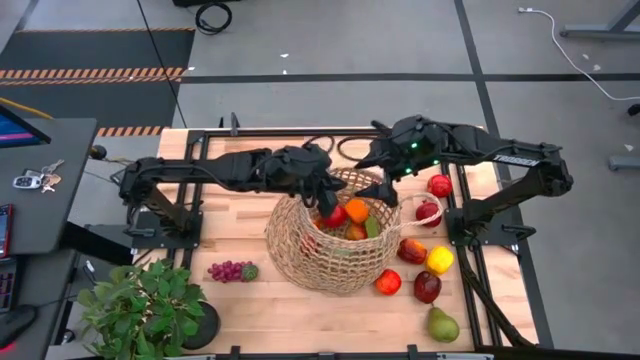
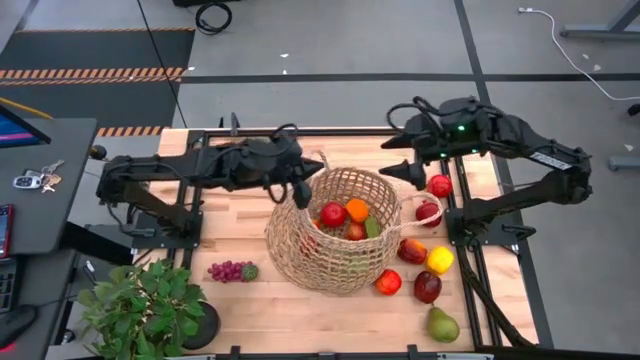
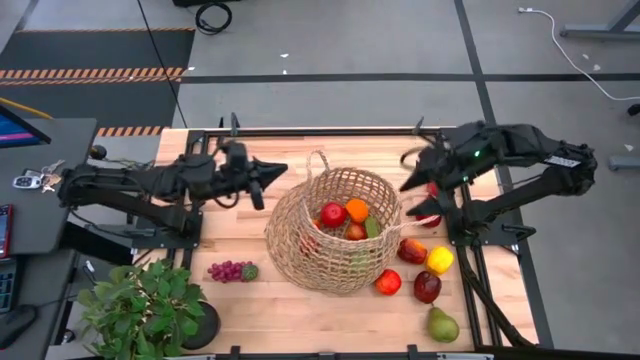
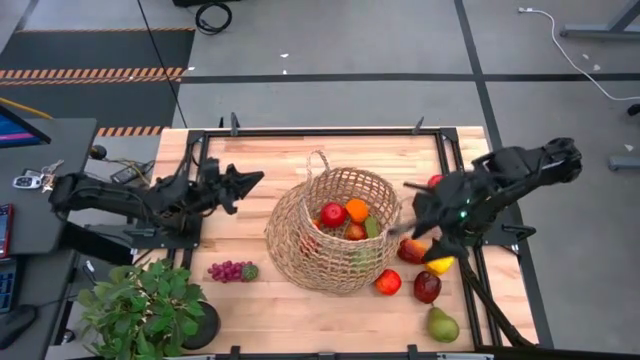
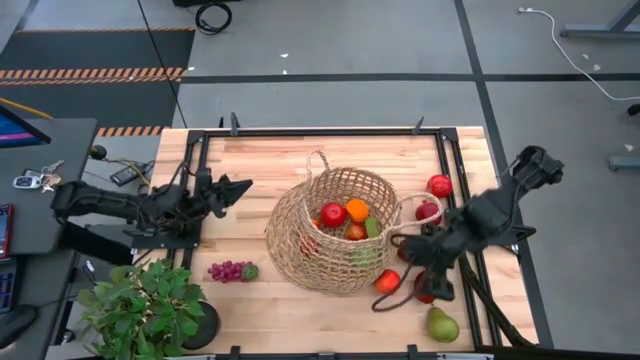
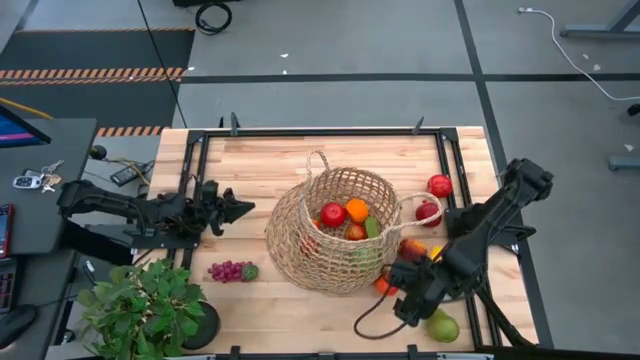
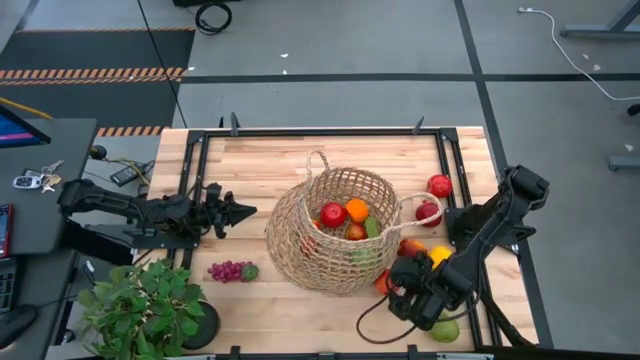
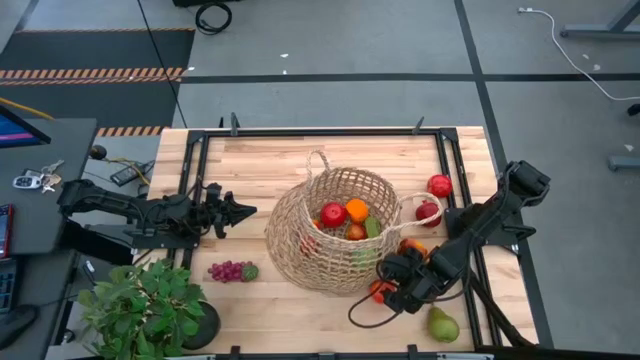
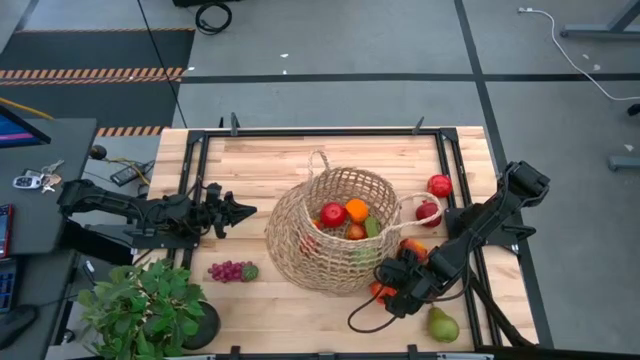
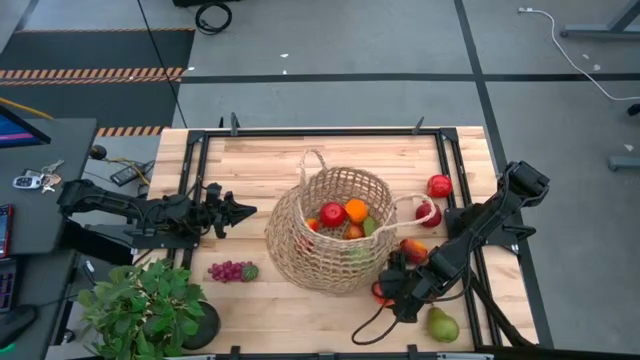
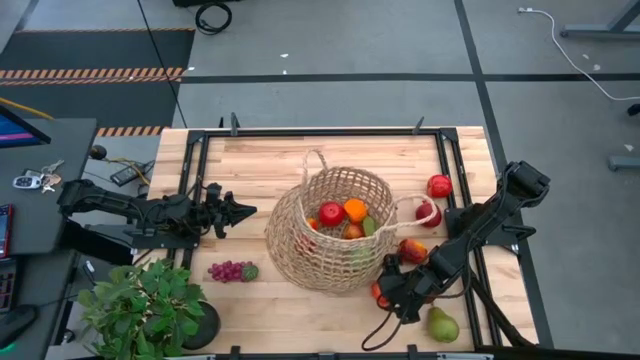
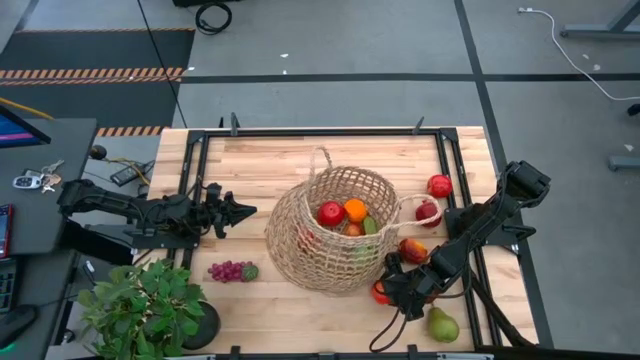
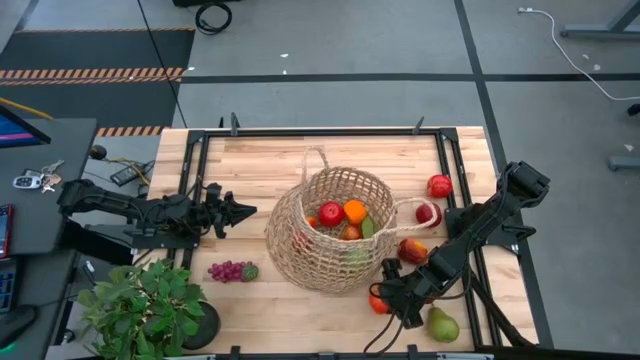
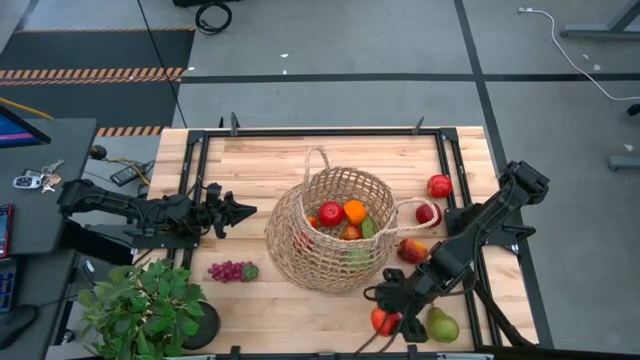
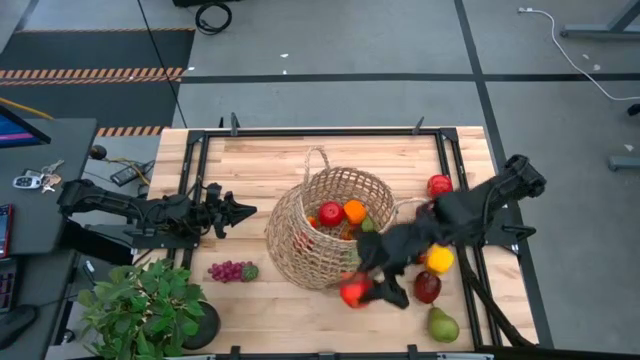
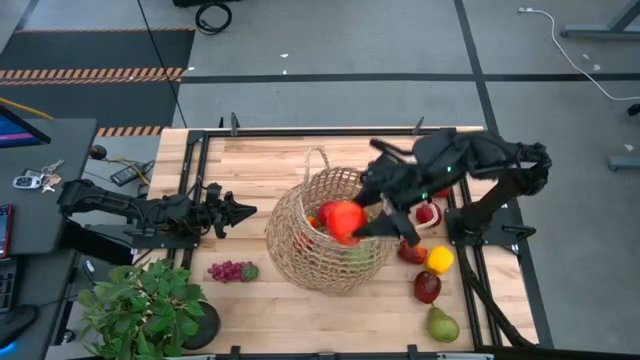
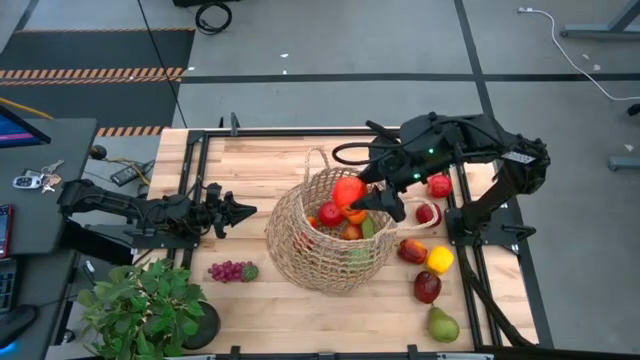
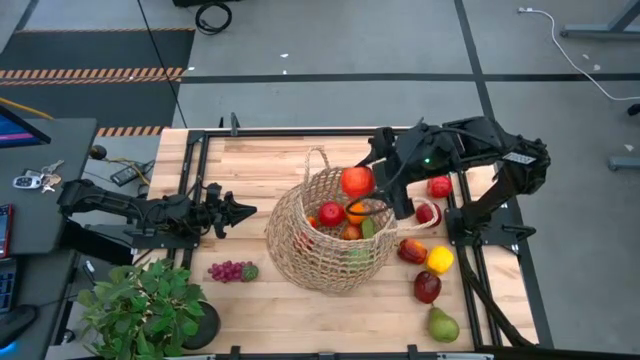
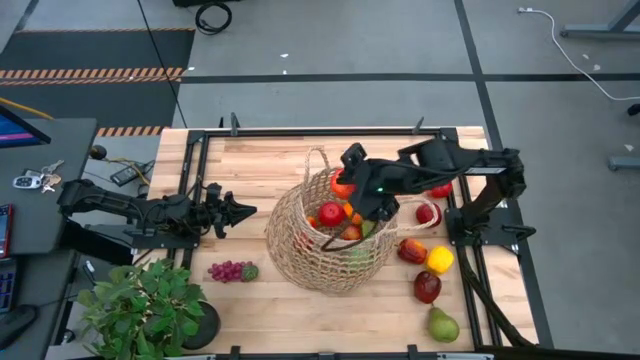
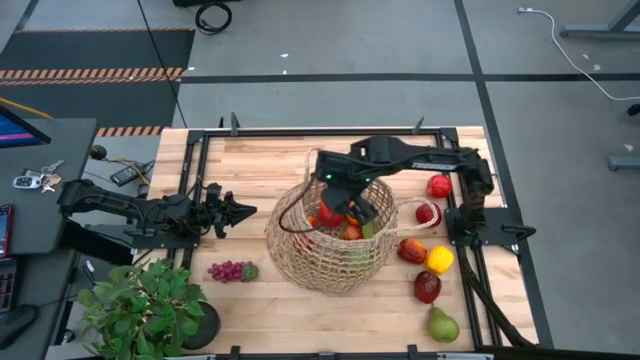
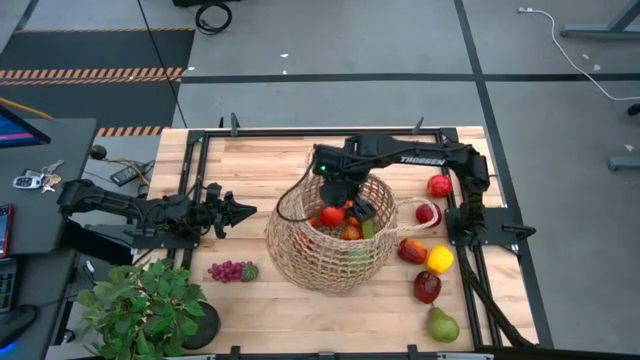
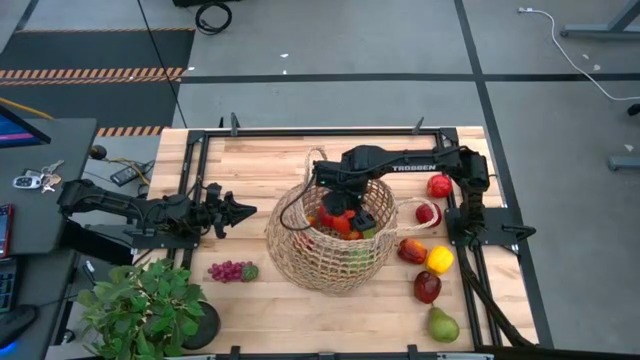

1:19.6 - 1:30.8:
Task: Build produce basket
Put the red apple into the brown basket

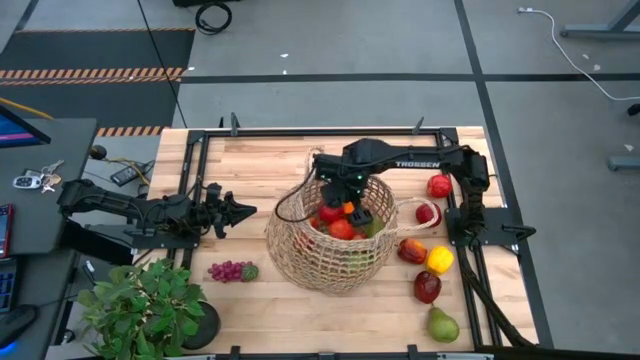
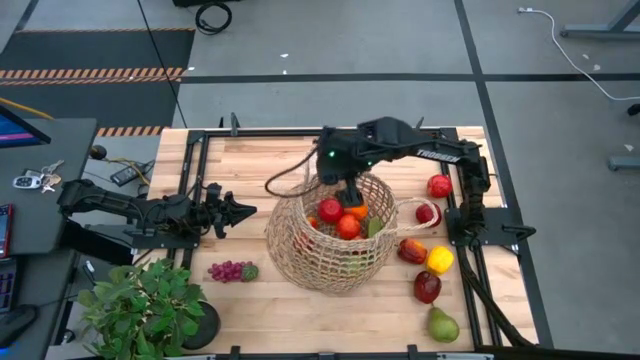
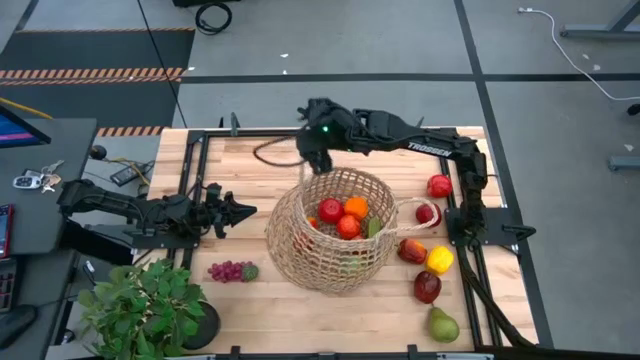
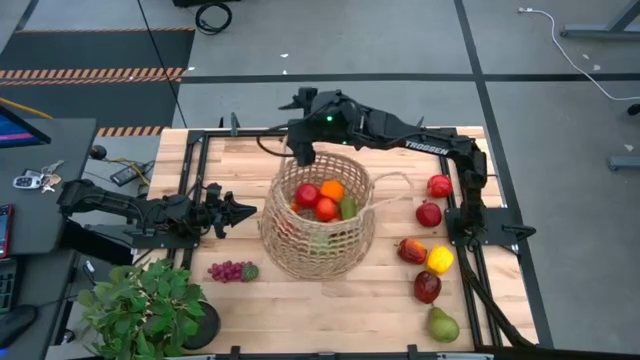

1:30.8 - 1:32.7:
Adjust the brown basket

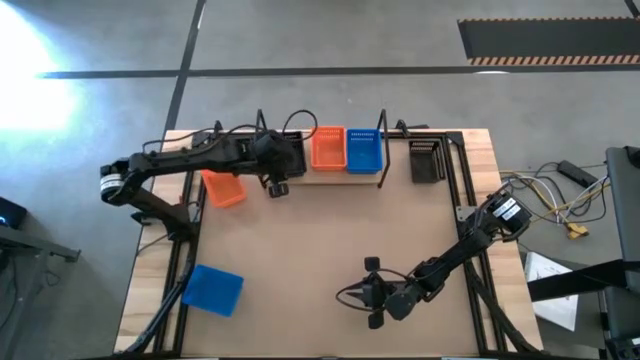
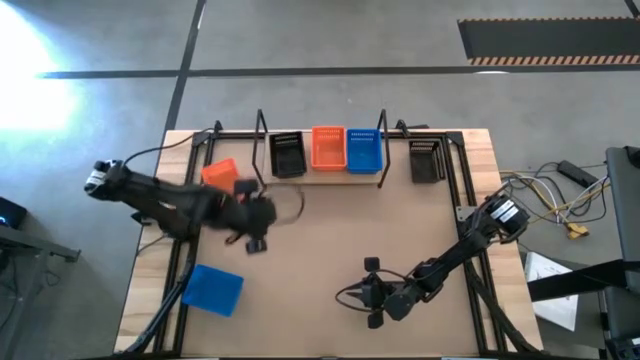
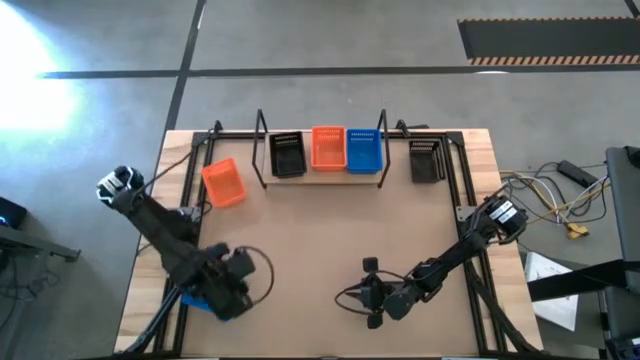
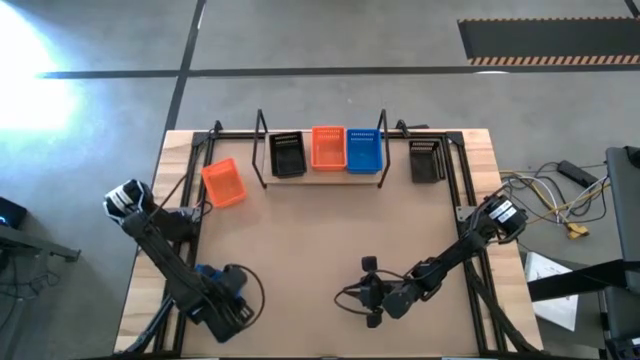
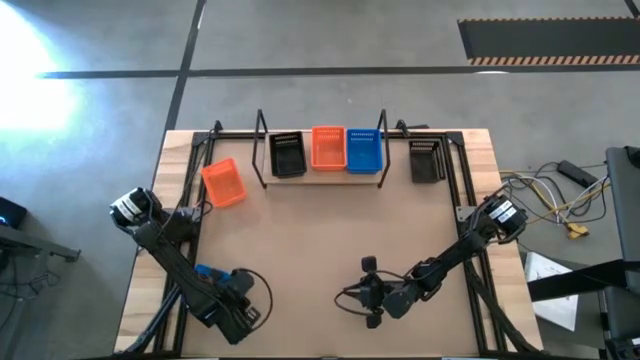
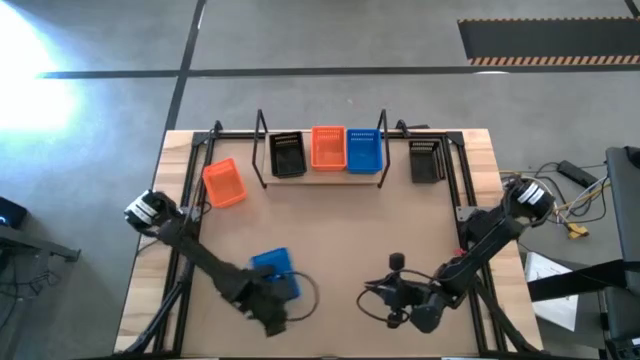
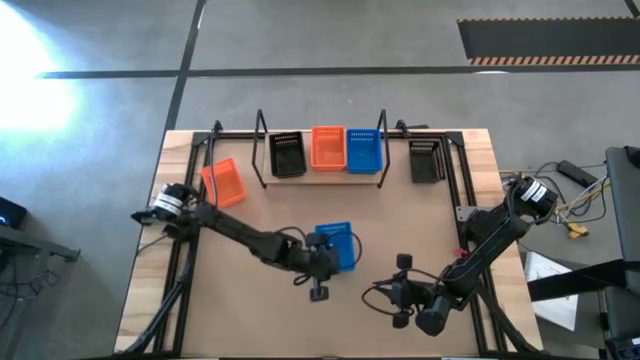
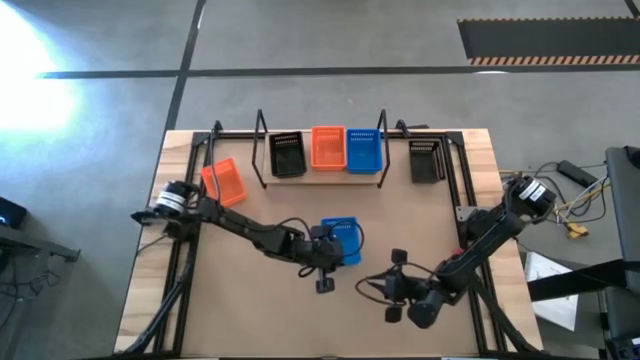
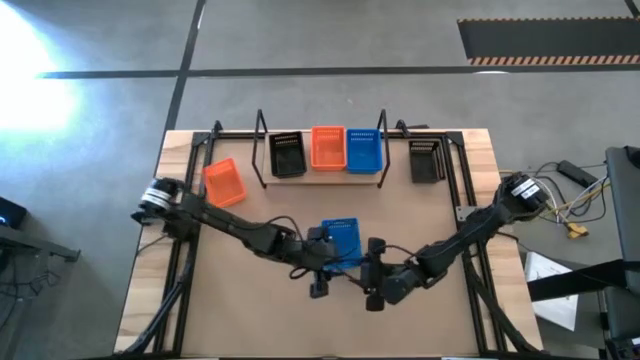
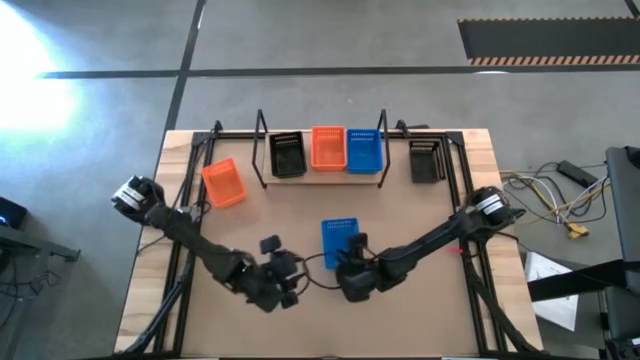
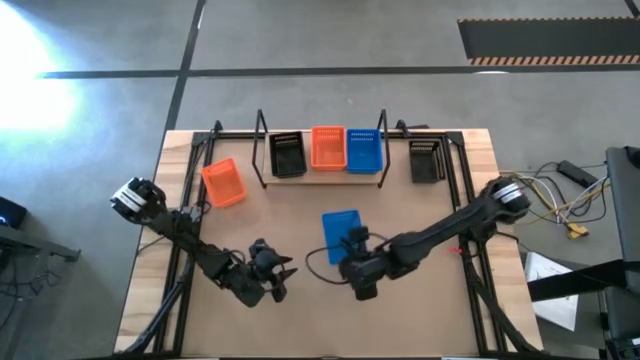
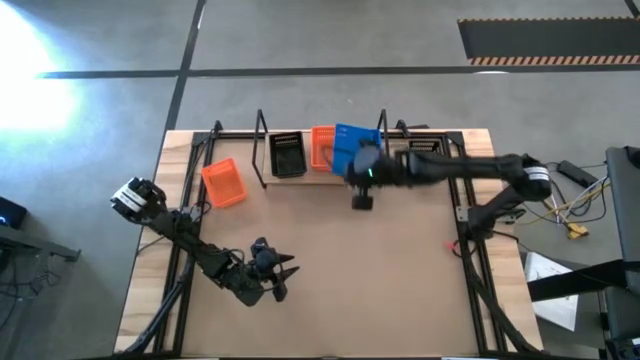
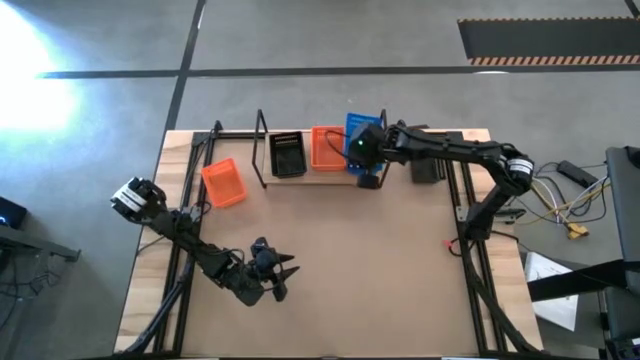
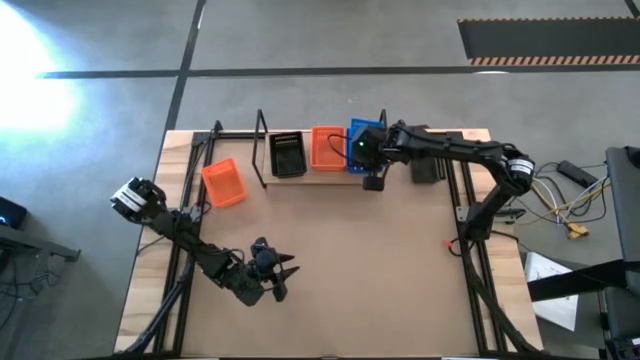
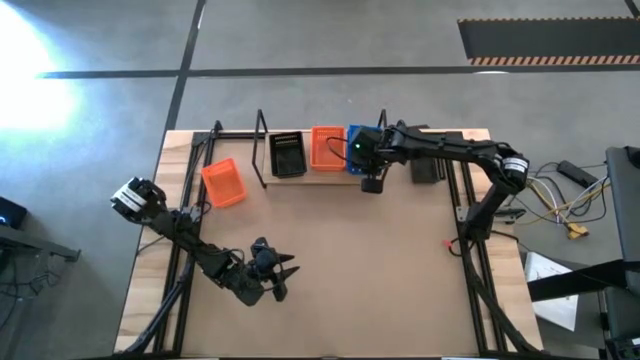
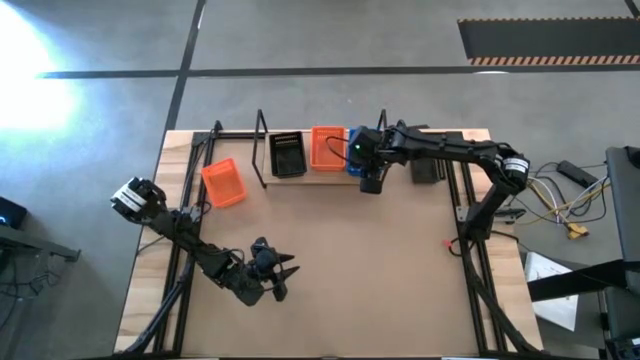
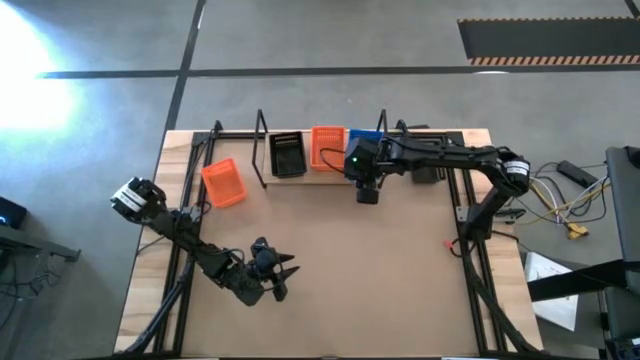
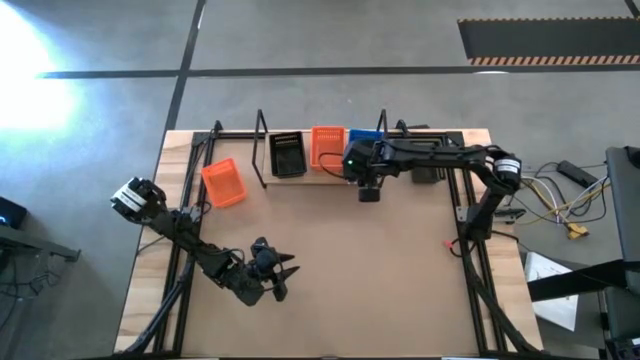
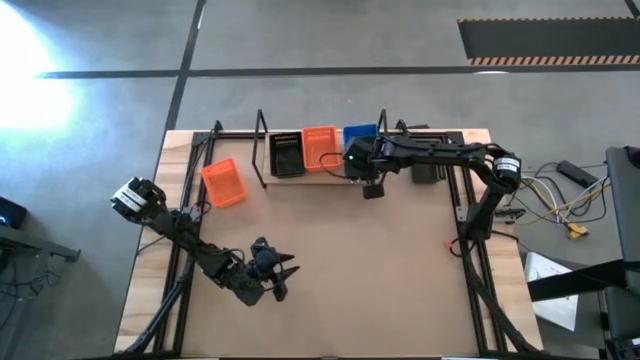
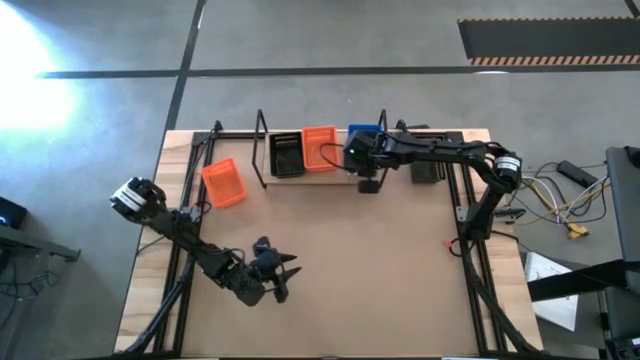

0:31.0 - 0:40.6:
Task: Stack baskets on shelf by color
Stack the blue bin on the blue bins on the shelf
